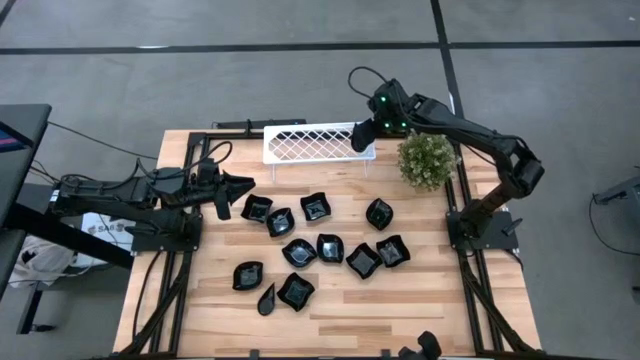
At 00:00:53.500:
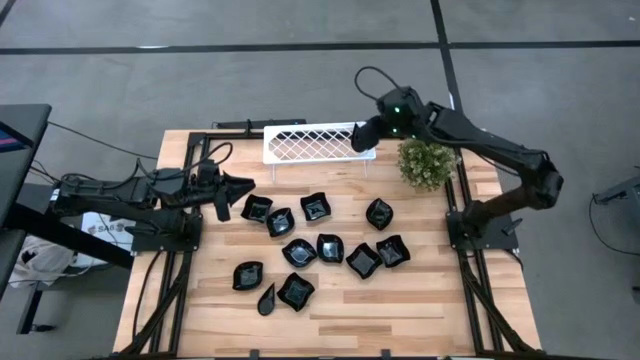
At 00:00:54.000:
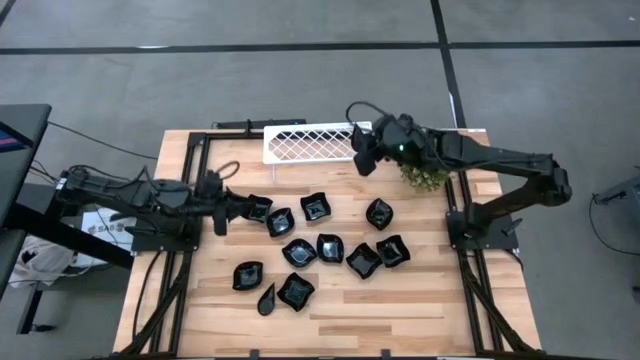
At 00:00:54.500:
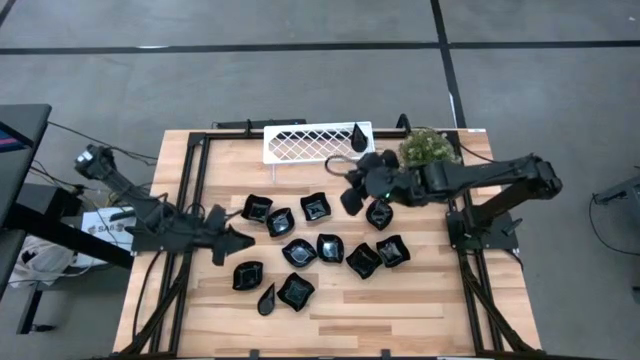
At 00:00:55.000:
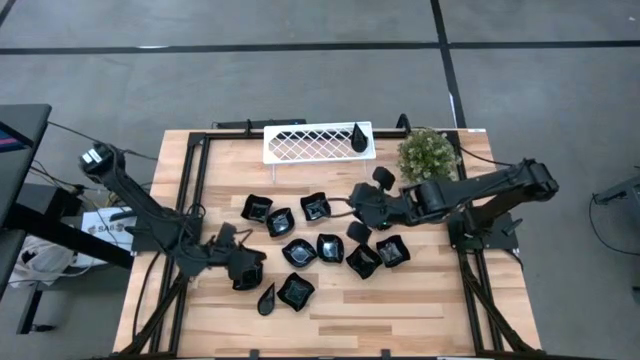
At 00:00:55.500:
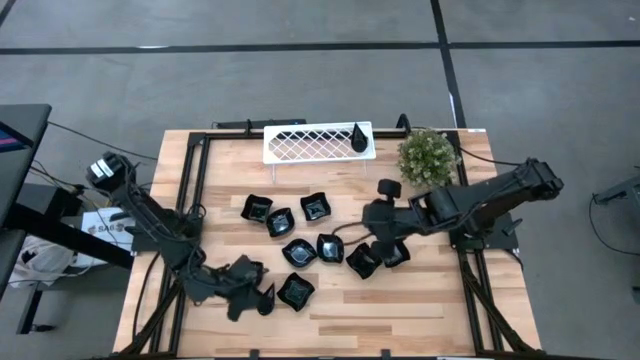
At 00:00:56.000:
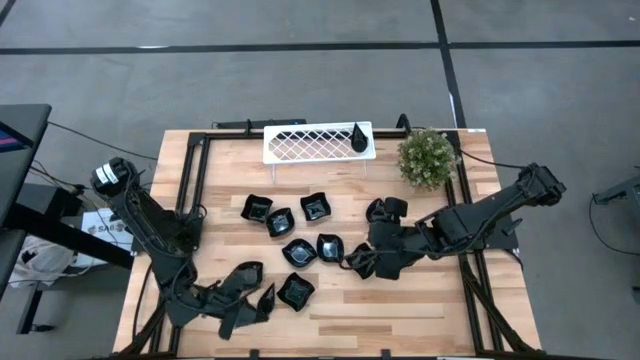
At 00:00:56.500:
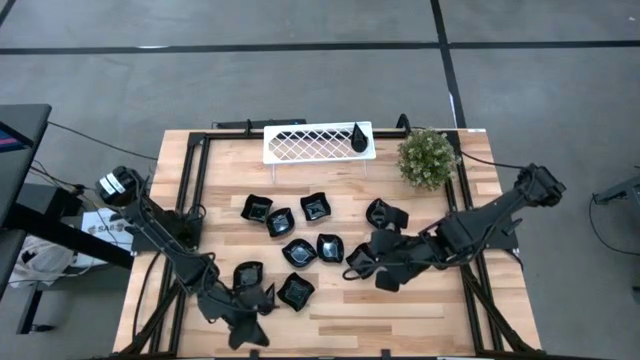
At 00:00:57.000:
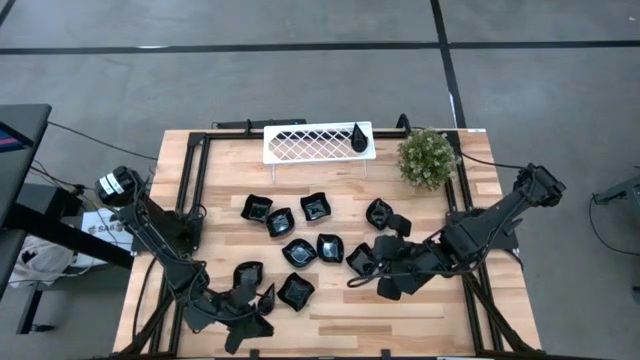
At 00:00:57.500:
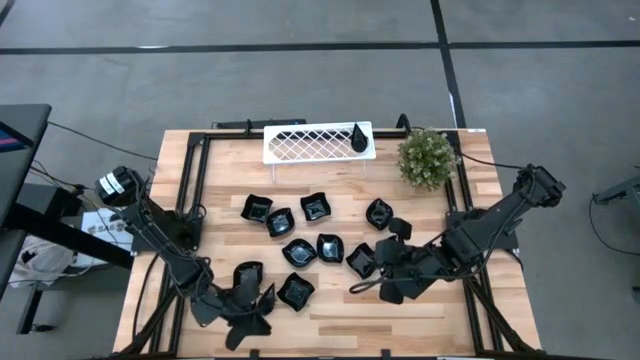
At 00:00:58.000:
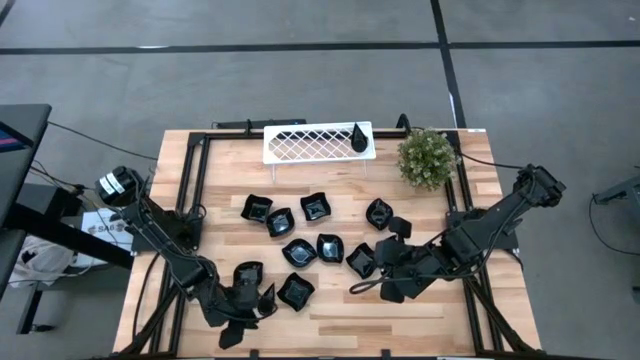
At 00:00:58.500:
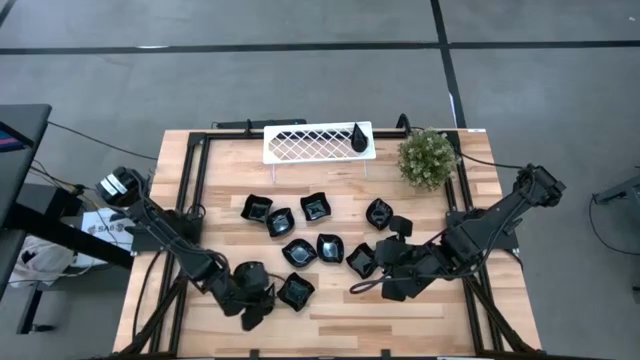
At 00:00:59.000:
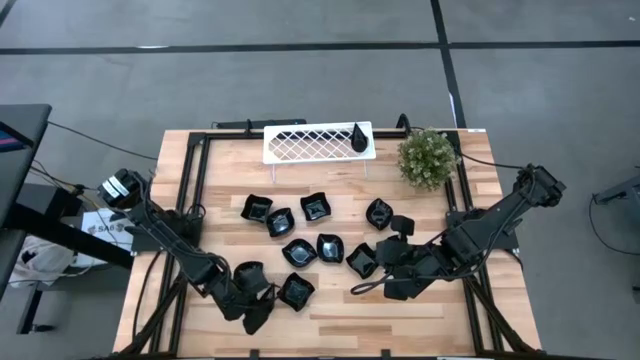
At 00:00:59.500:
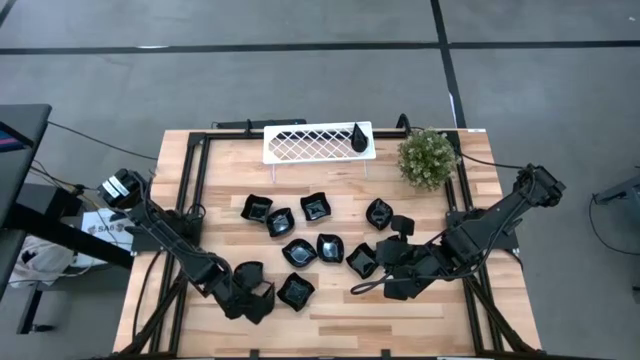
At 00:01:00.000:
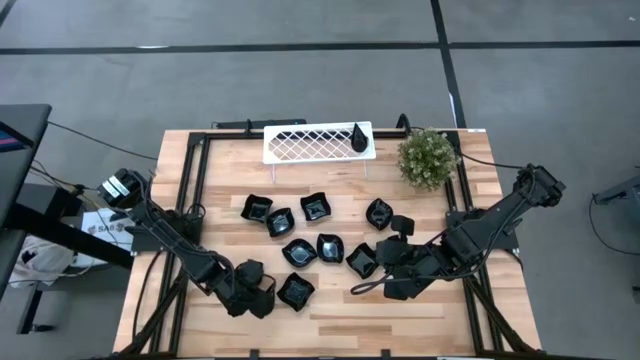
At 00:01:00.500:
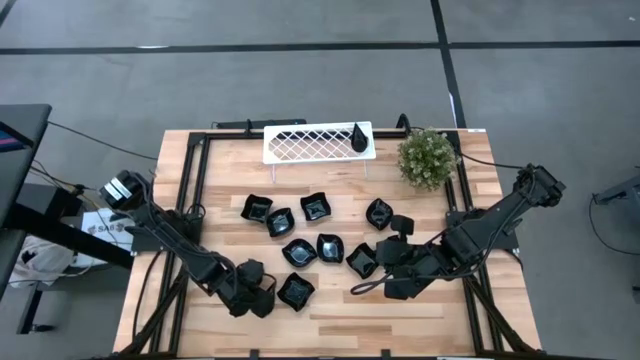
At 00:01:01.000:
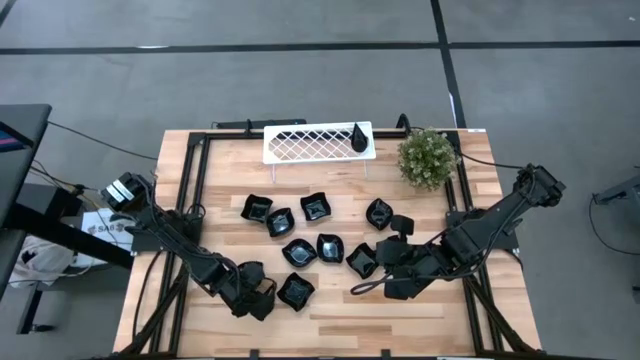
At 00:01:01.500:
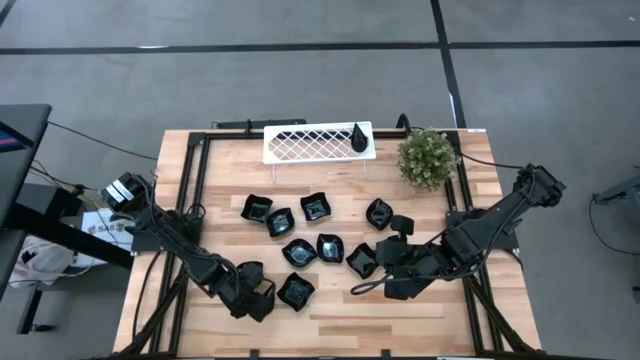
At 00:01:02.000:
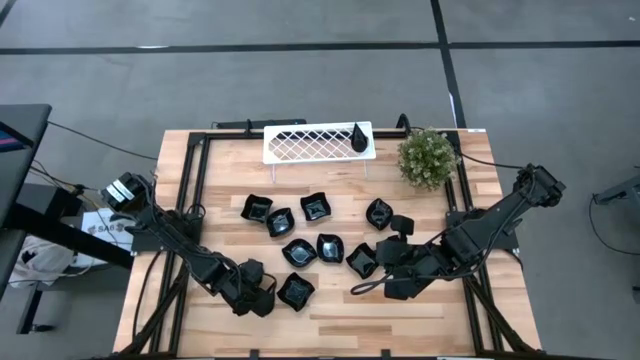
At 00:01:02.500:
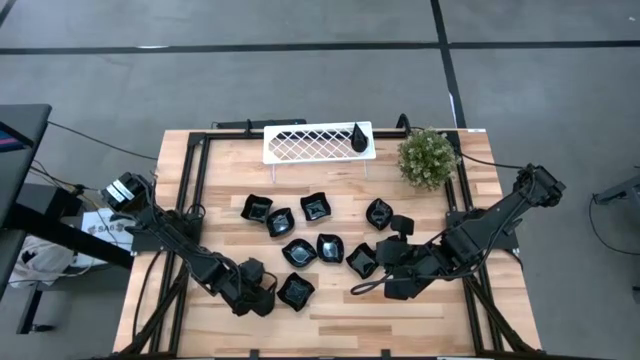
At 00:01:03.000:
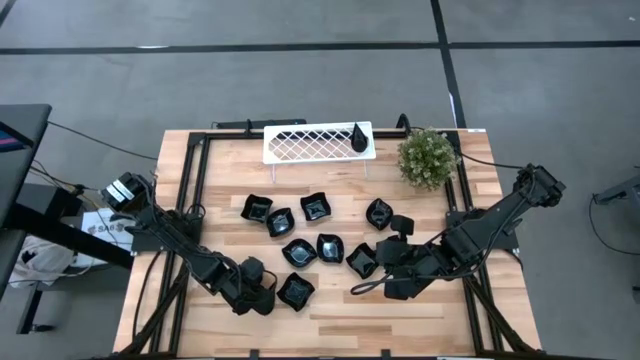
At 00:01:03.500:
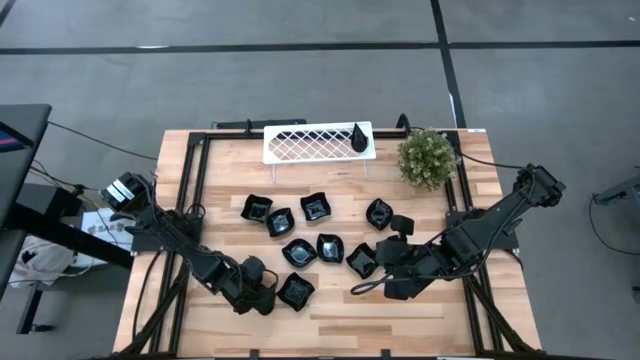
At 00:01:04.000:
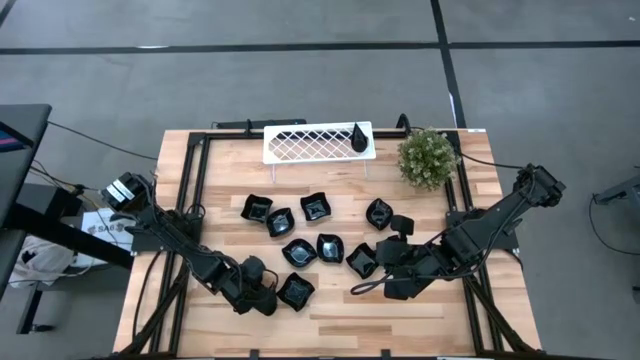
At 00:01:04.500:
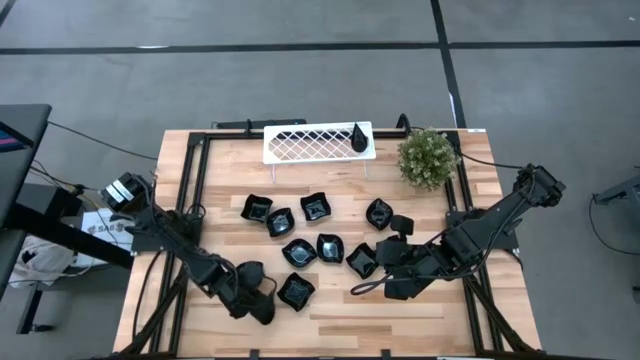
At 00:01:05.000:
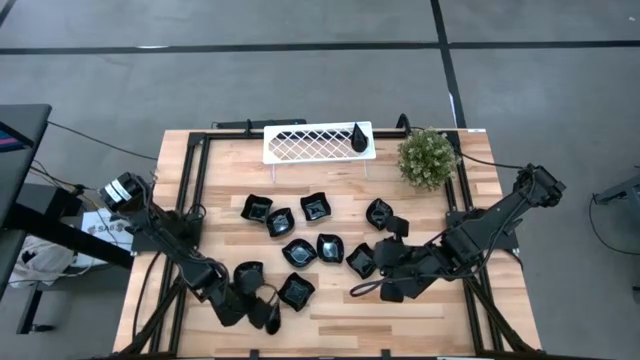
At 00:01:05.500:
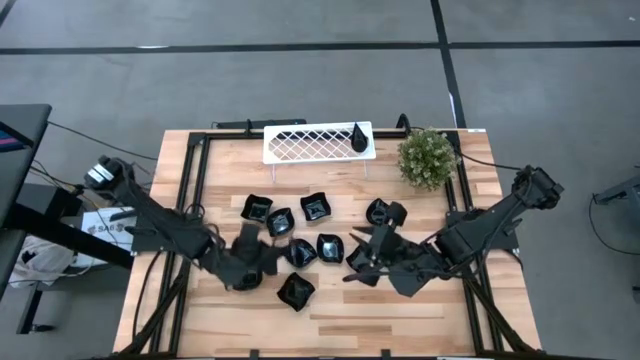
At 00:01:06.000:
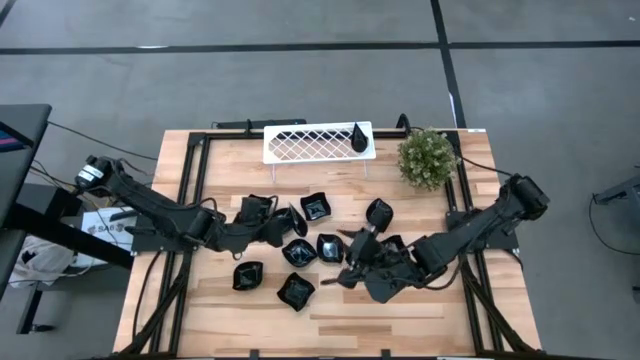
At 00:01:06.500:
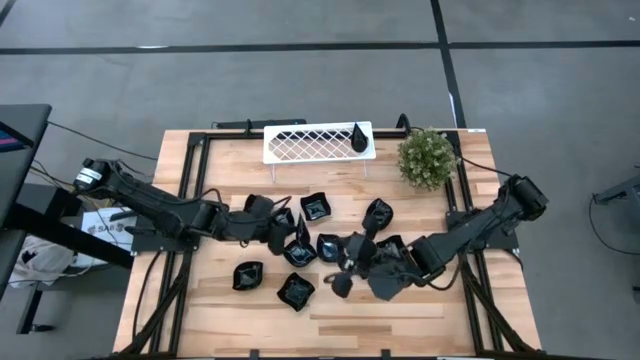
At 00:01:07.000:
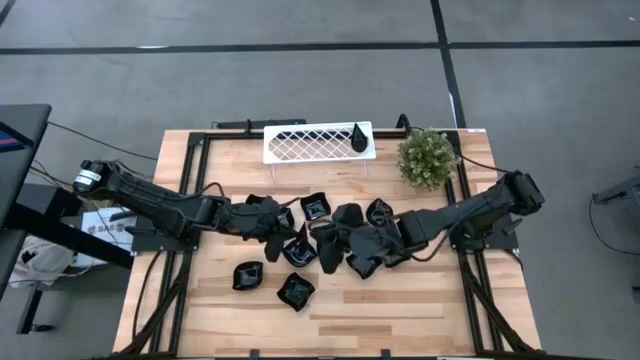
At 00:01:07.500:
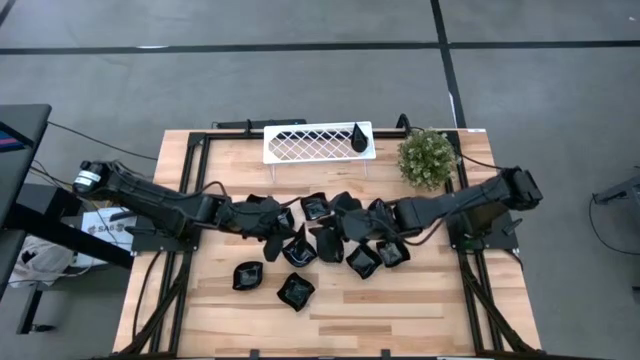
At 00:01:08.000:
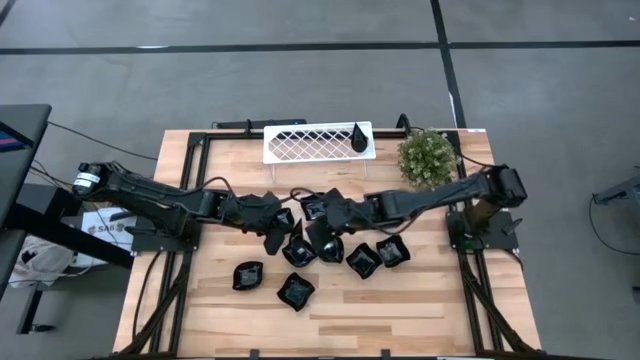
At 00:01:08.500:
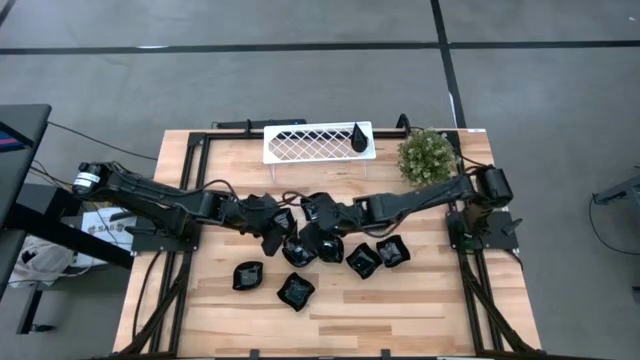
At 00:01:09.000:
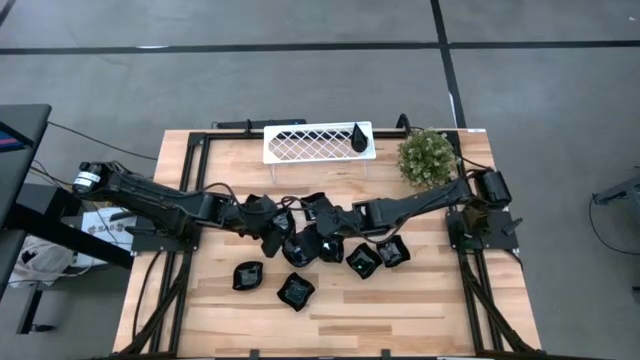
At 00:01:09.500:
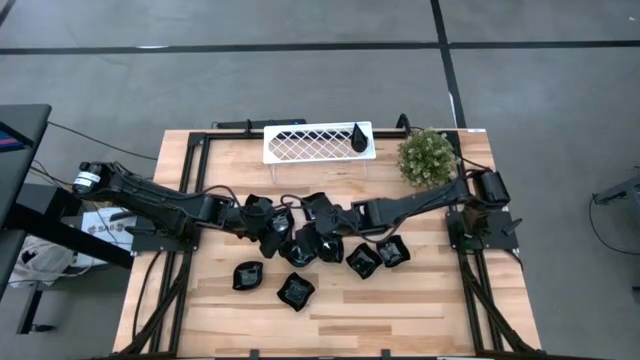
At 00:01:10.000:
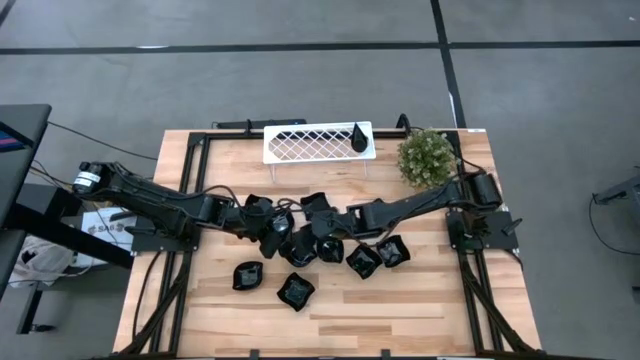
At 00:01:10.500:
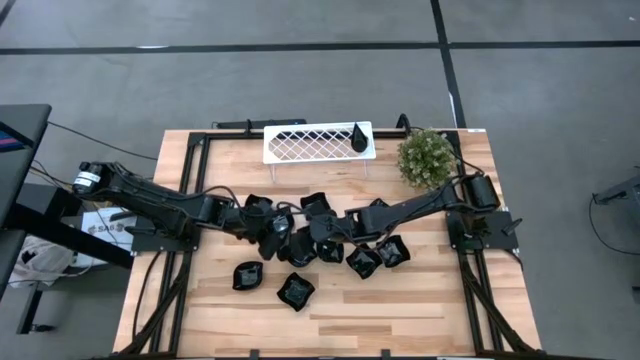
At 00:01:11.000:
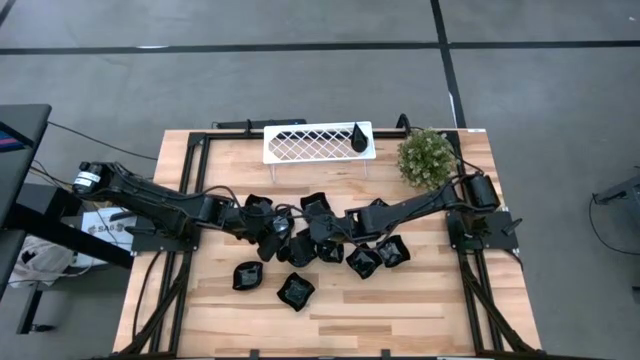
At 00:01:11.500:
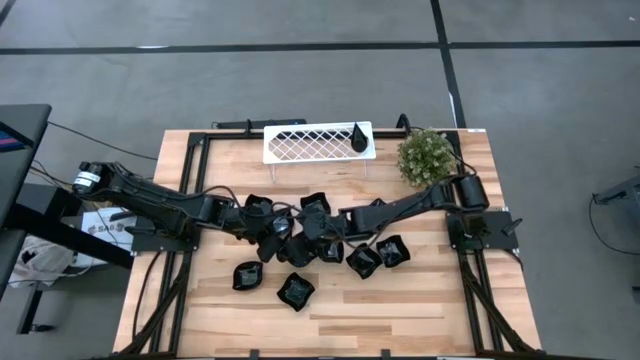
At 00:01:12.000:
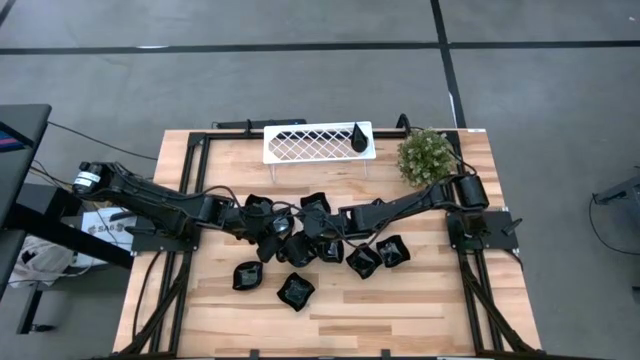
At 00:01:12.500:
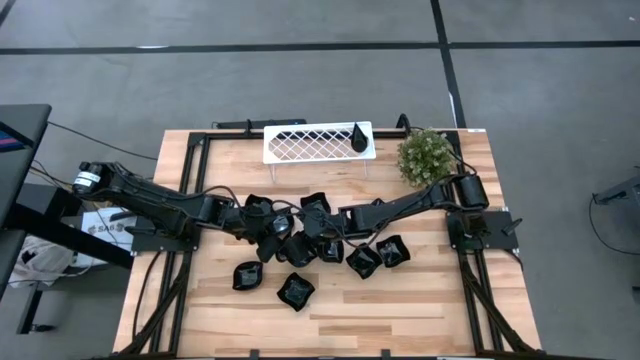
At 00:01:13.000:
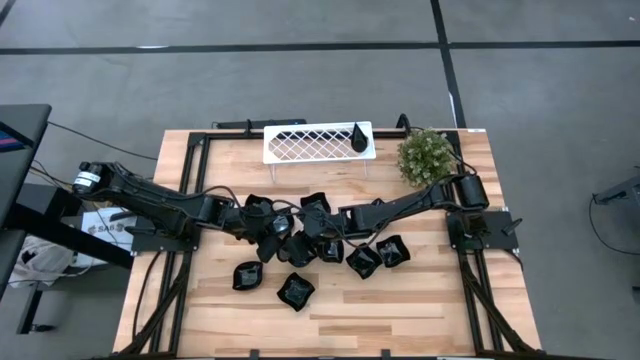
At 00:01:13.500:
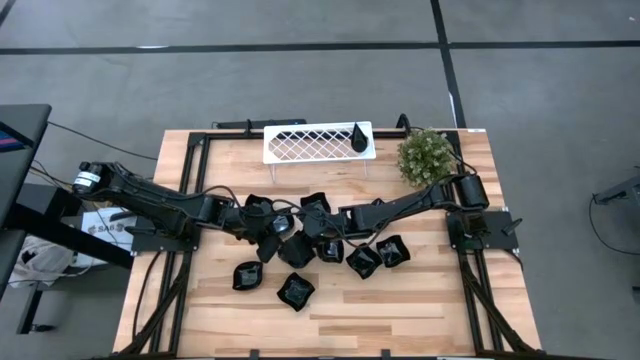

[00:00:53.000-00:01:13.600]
Task: Pick & Place Mini shaped plates
Stack the black drop shaped plate on top of the black drop shaped plate on the shelf
